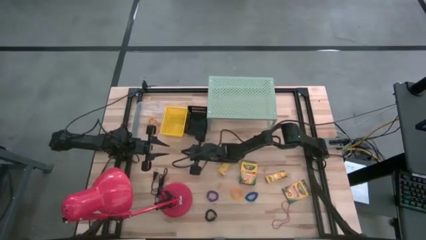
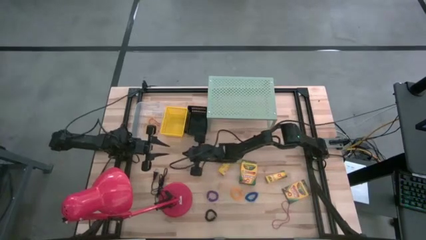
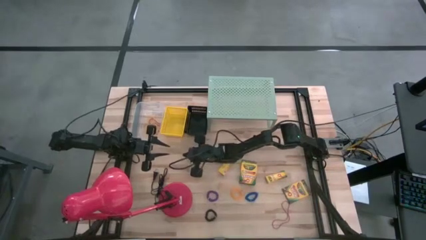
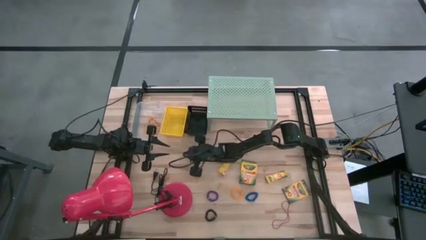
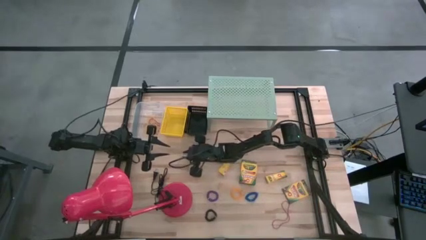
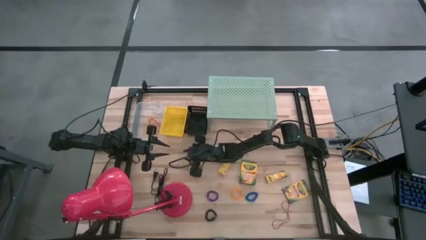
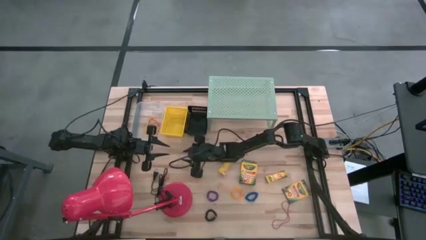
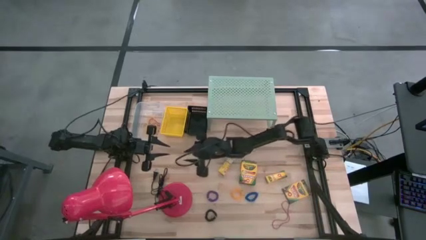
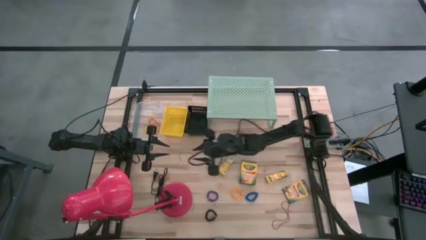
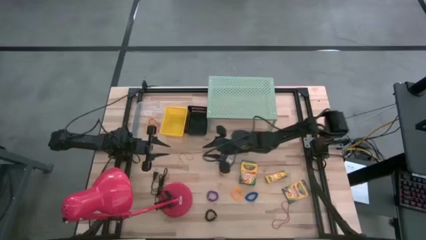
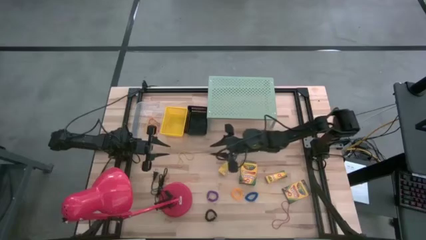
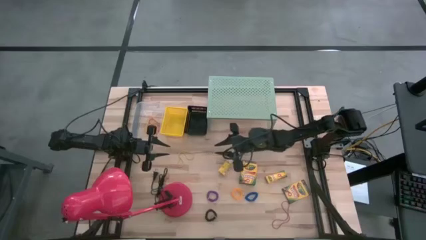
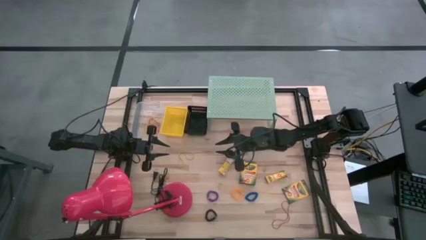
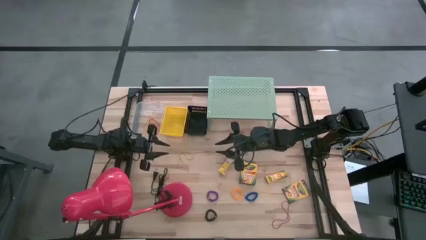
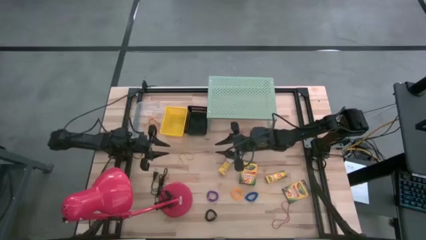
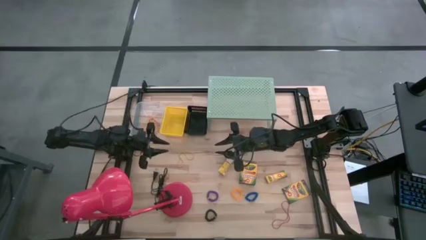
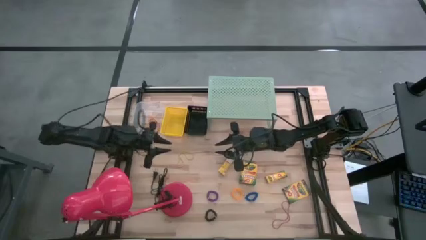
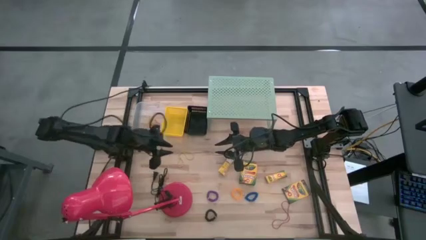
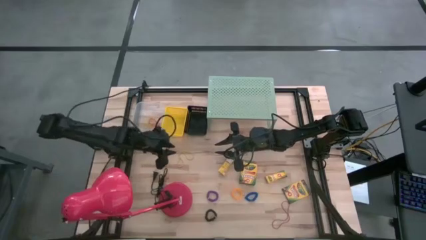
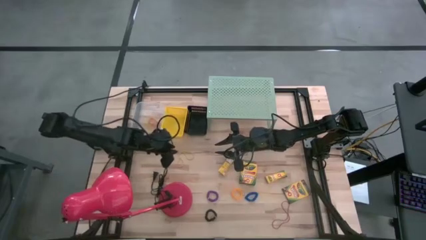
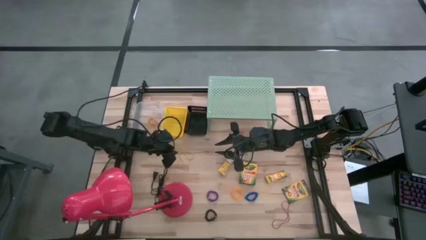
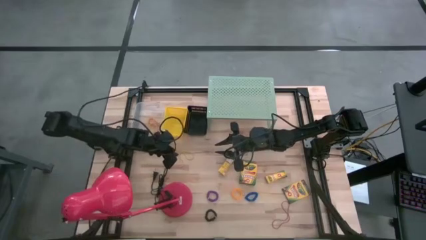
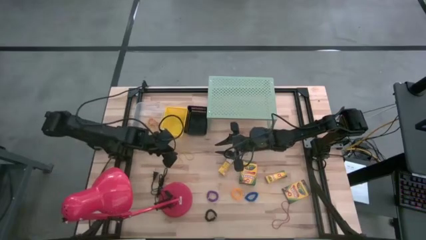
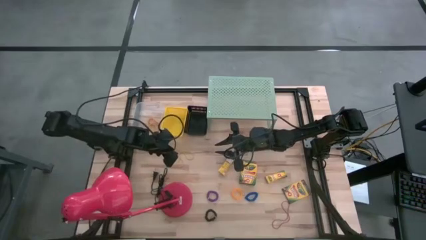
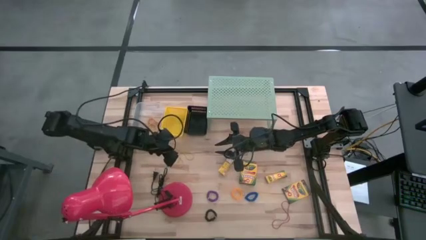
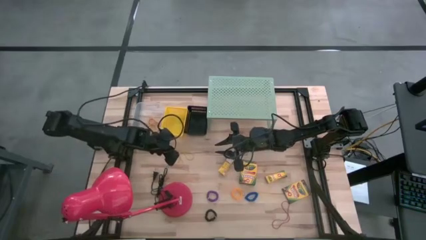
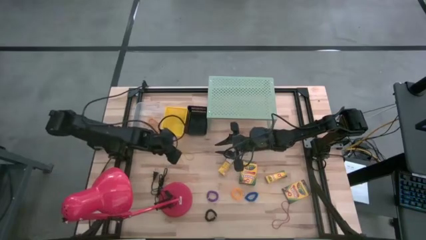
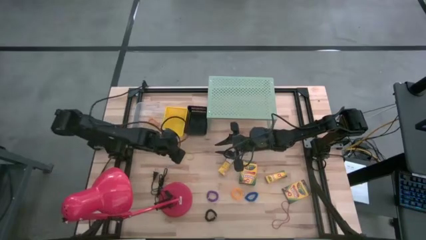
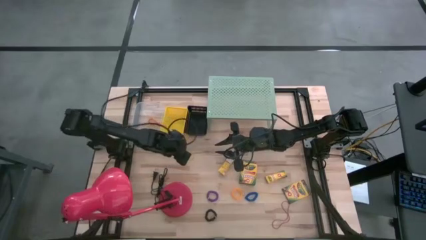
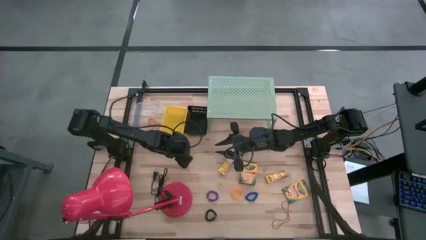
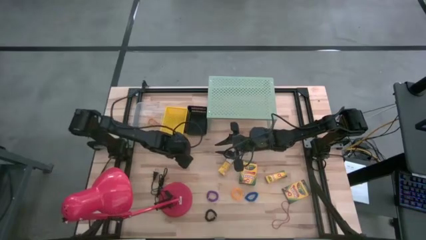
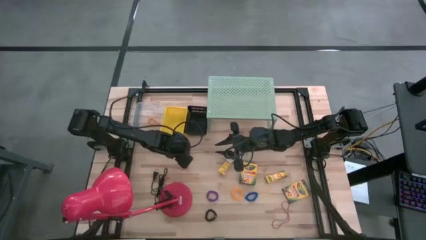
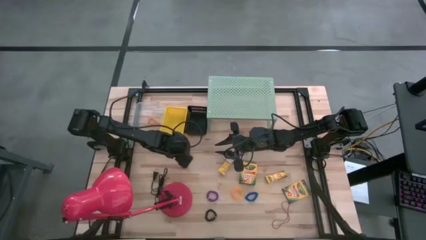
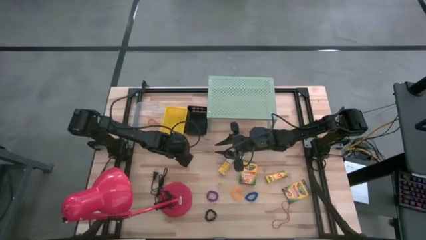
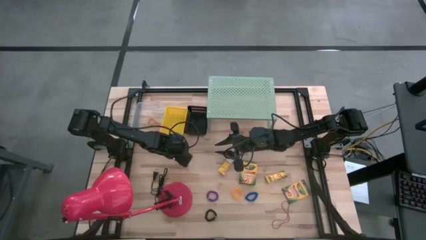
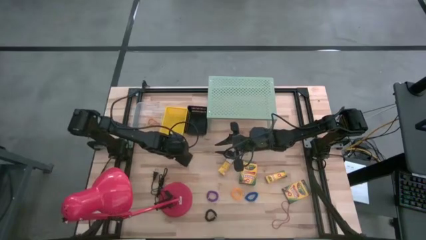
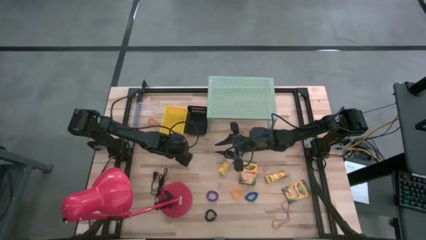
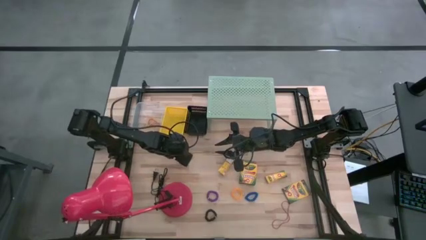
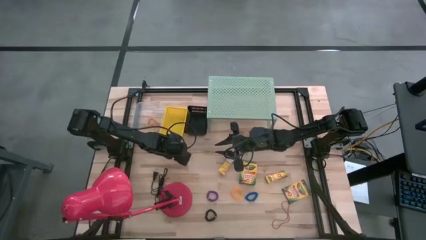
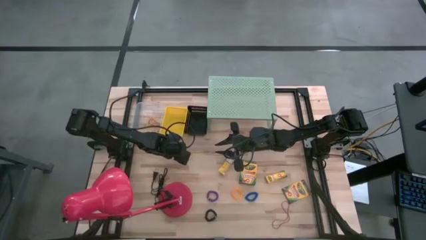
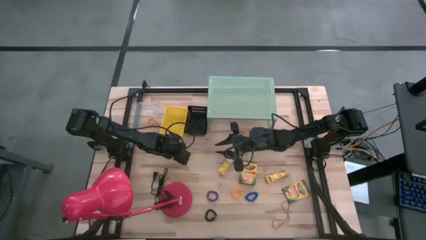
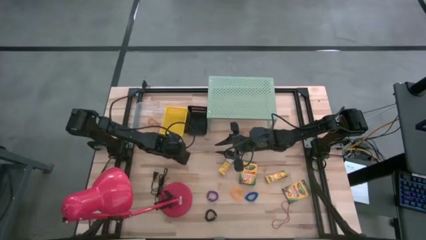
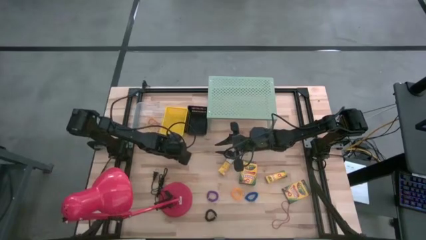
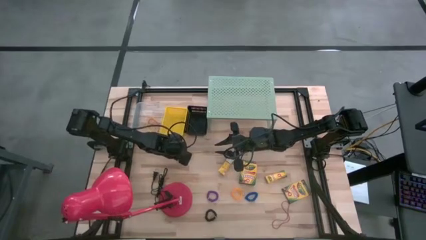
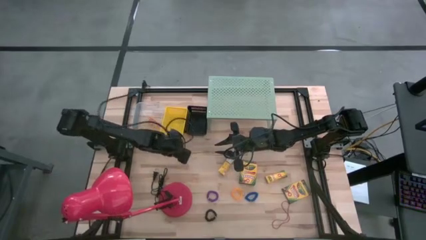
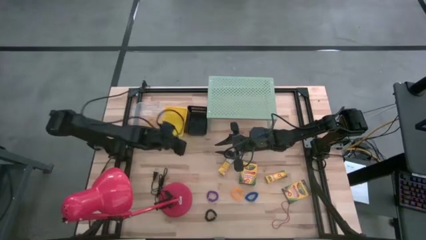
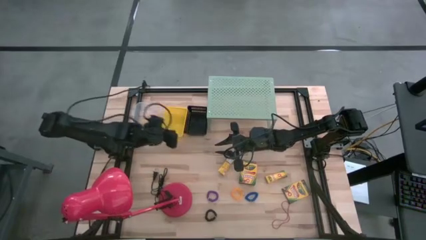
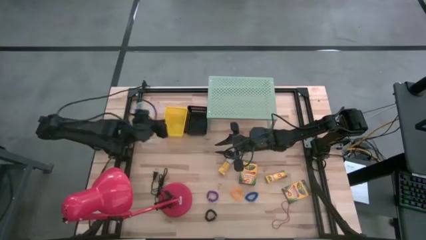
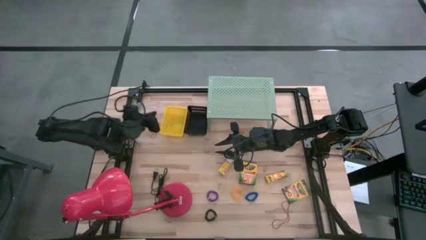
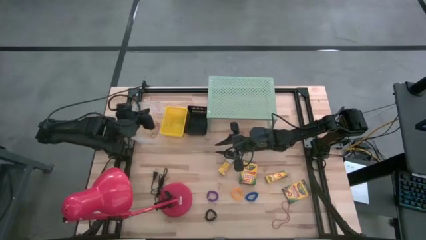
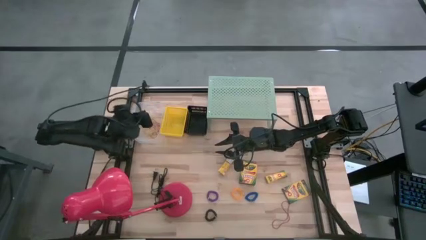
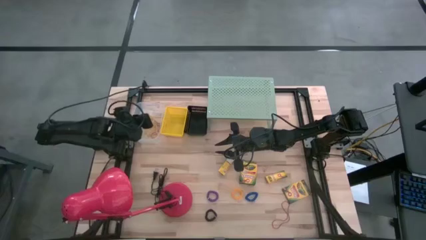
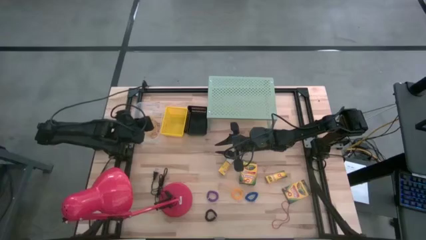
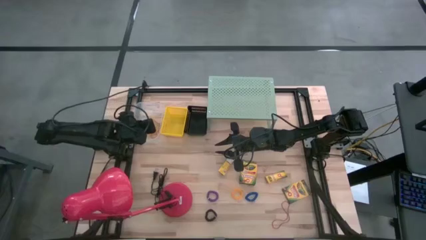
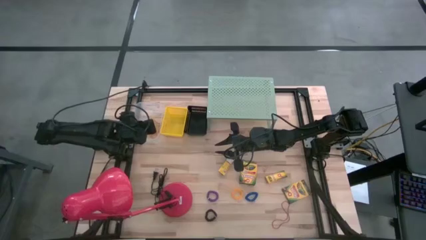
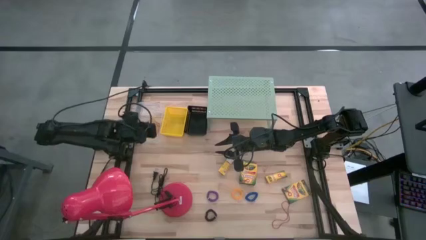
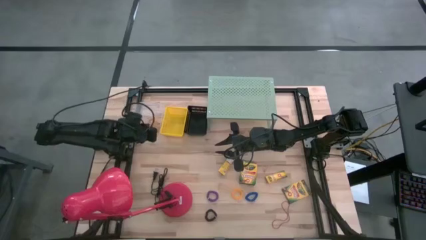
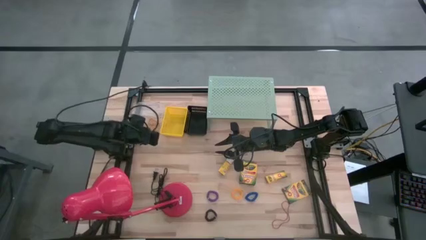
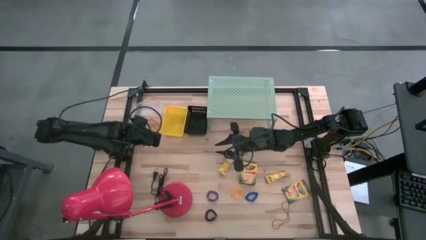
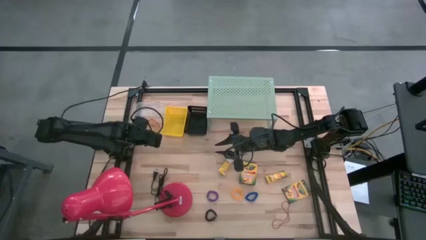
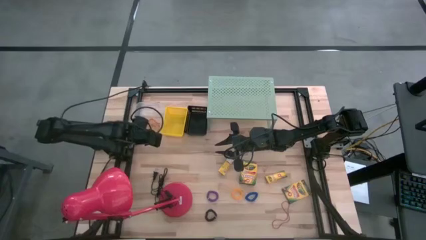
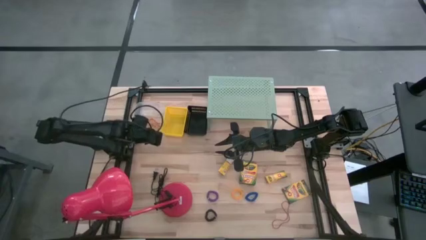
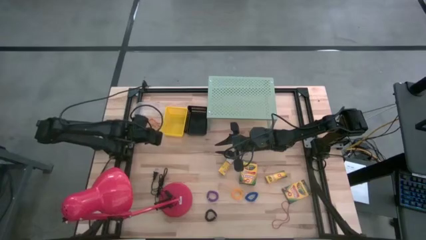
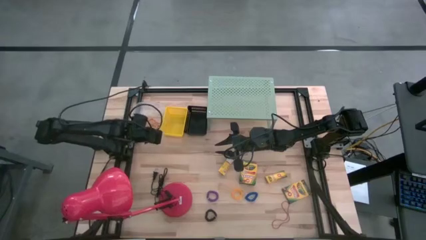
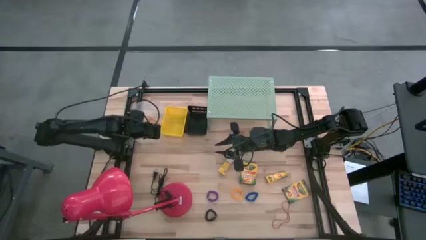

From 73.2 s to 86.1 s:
Task: Pick & Place Office Desk Supplies
Put the yellow rubber band into the transparent bin

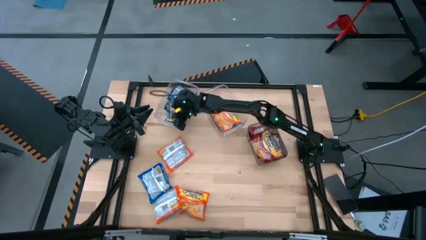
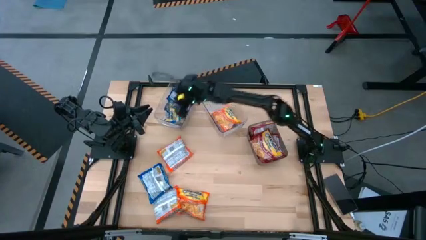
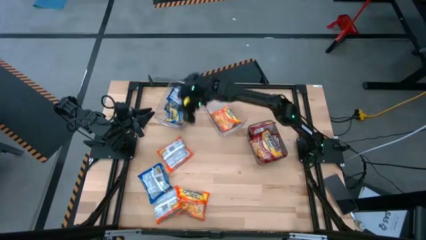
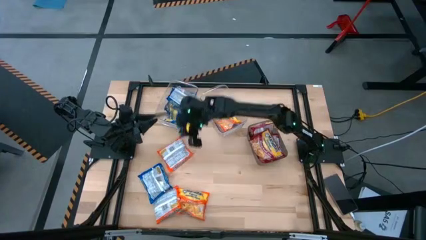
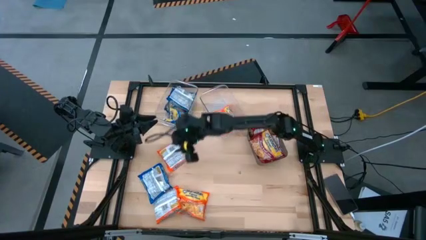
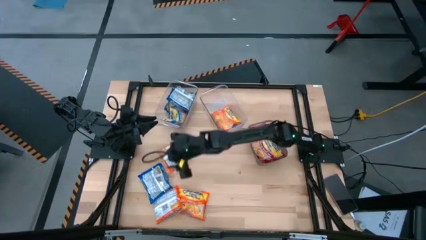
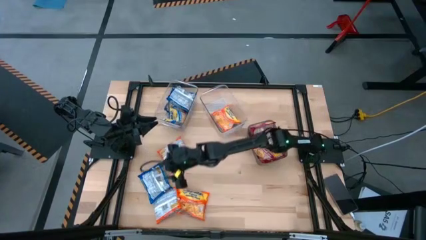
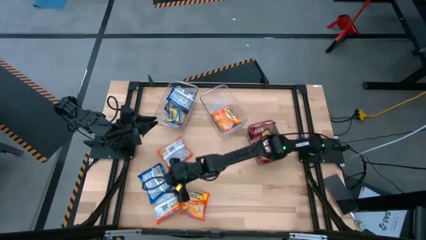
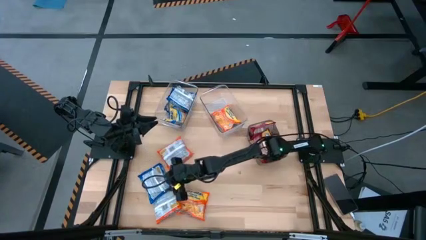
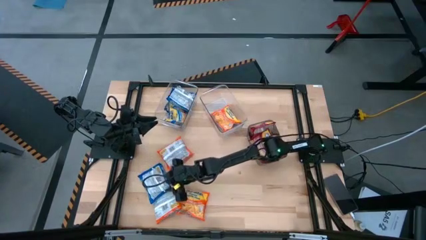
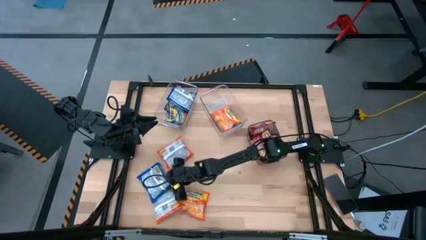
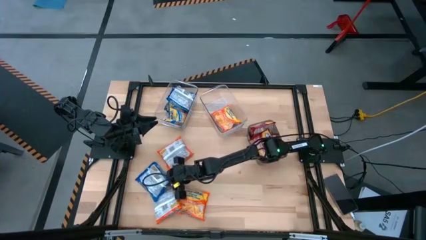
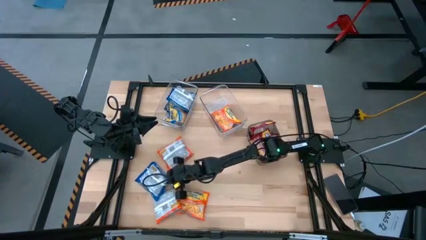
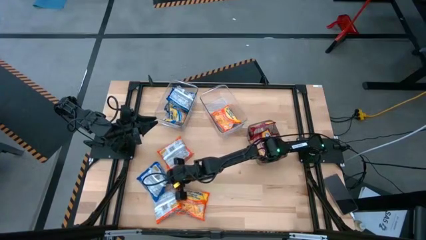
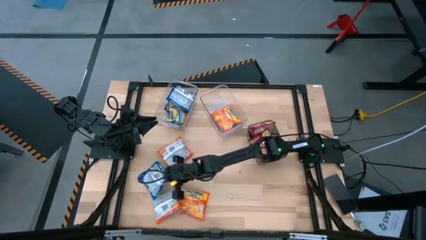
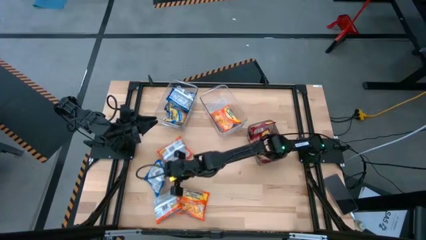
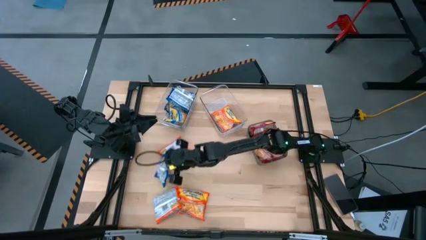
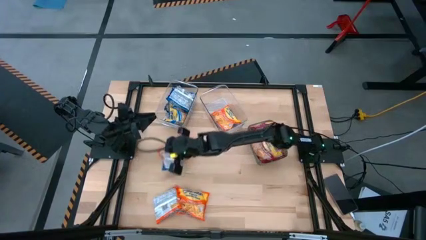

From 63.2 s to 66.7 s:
Task: Sort Maruchan noodles
Put the blue noodle pack into the left transparent bin
